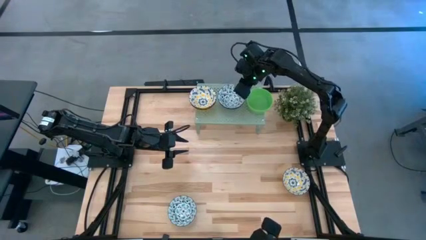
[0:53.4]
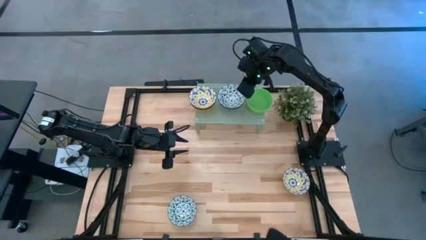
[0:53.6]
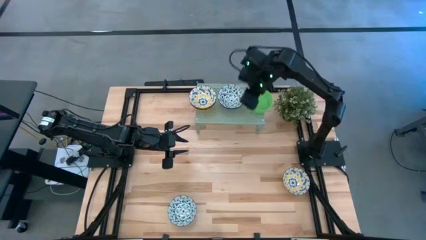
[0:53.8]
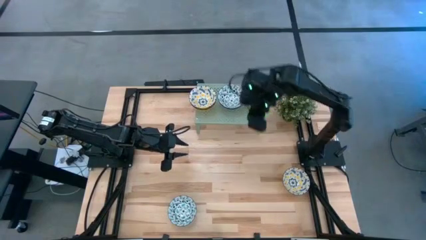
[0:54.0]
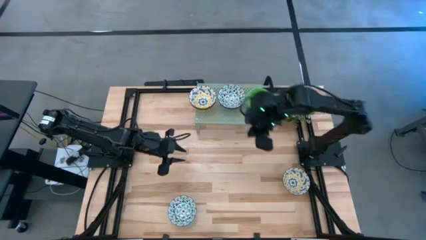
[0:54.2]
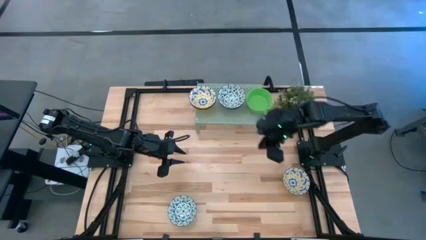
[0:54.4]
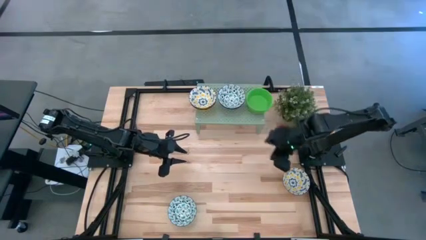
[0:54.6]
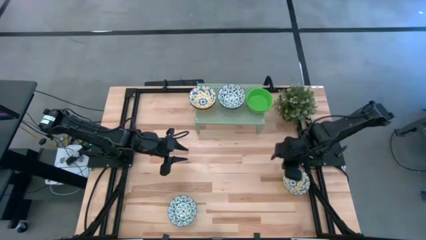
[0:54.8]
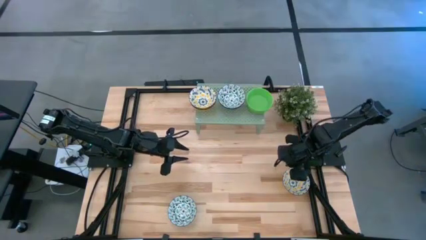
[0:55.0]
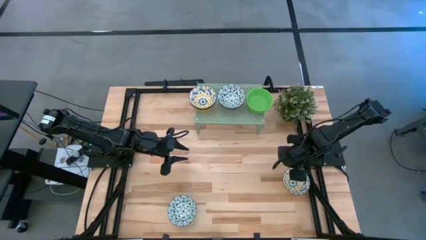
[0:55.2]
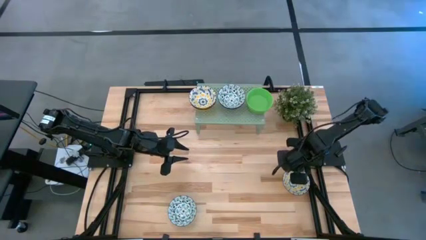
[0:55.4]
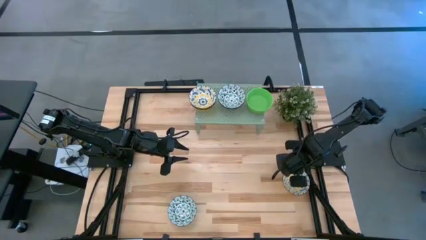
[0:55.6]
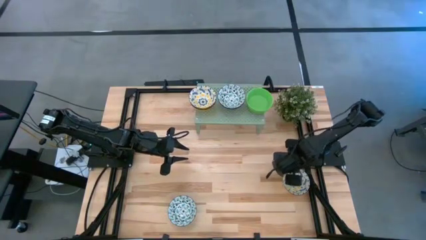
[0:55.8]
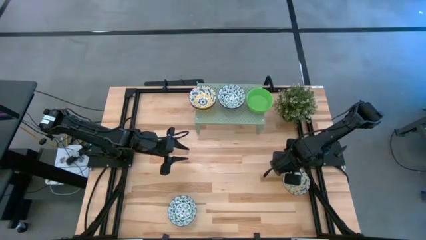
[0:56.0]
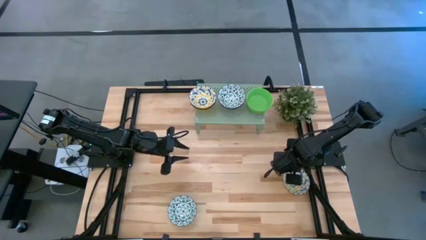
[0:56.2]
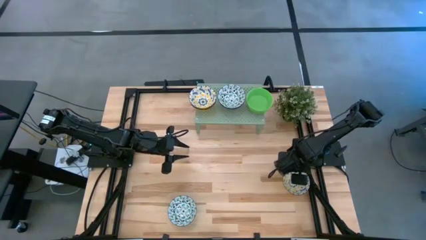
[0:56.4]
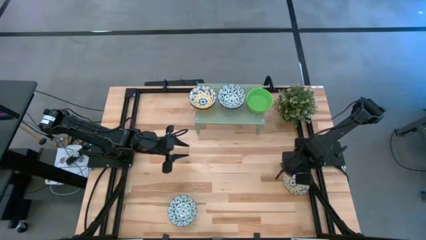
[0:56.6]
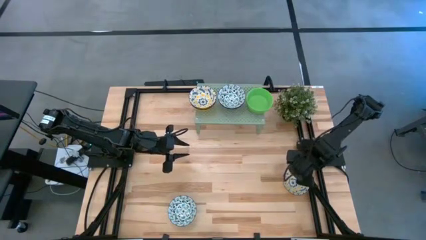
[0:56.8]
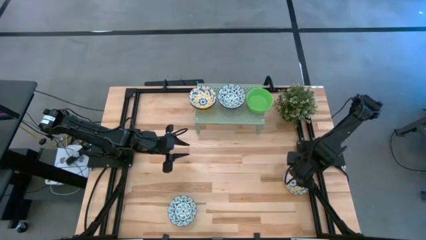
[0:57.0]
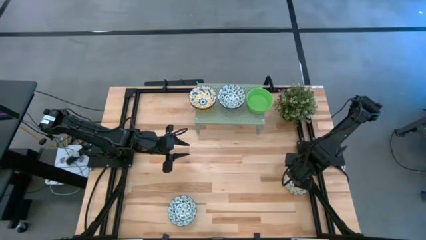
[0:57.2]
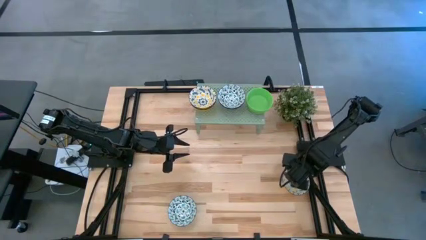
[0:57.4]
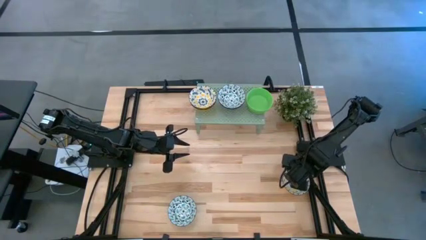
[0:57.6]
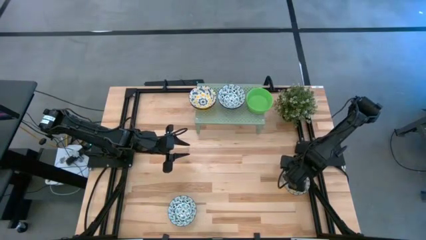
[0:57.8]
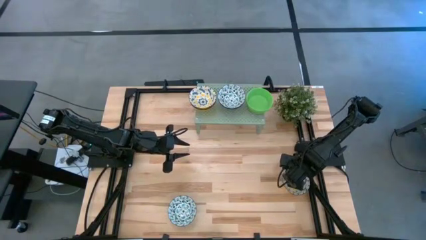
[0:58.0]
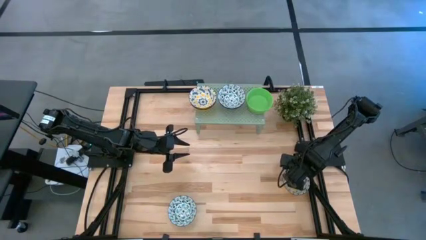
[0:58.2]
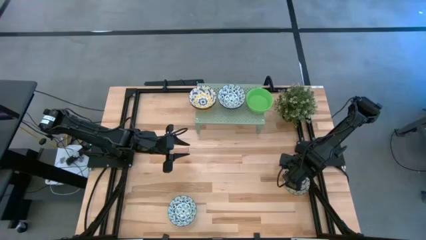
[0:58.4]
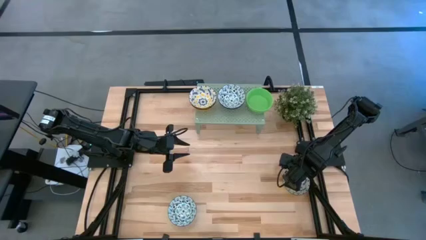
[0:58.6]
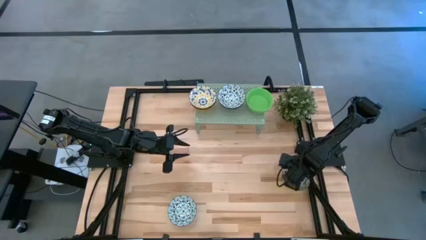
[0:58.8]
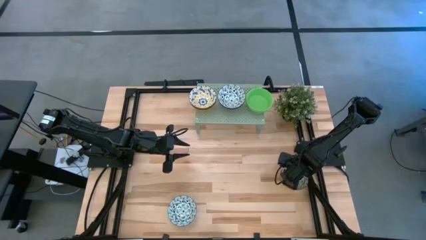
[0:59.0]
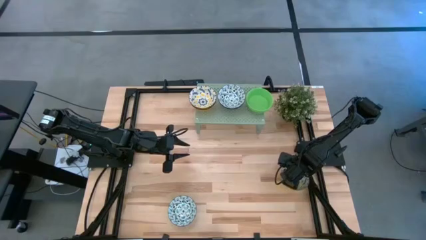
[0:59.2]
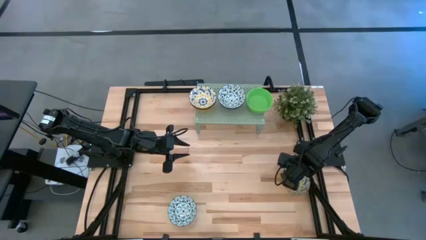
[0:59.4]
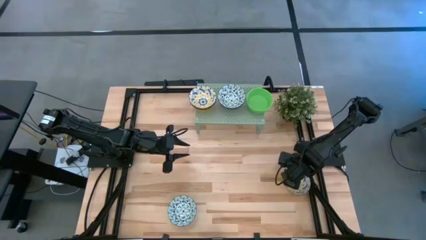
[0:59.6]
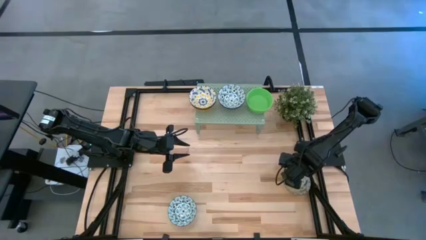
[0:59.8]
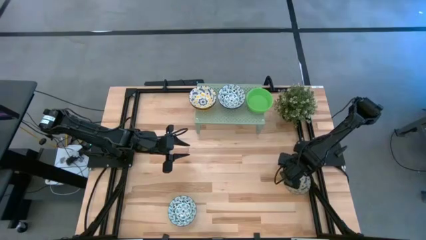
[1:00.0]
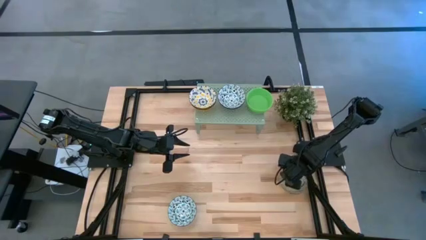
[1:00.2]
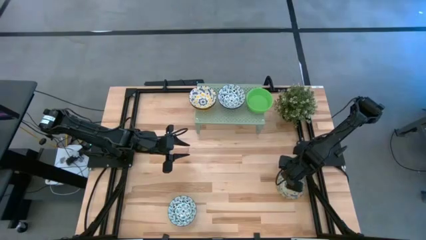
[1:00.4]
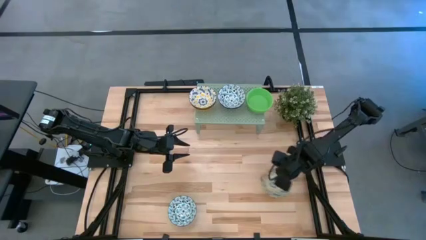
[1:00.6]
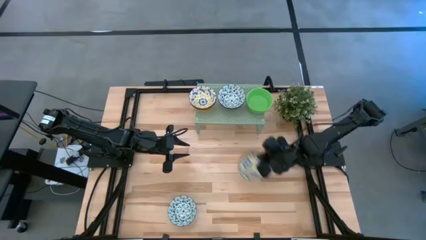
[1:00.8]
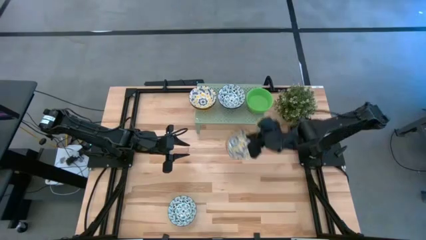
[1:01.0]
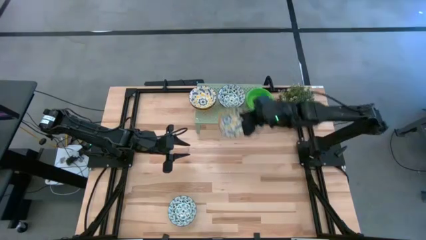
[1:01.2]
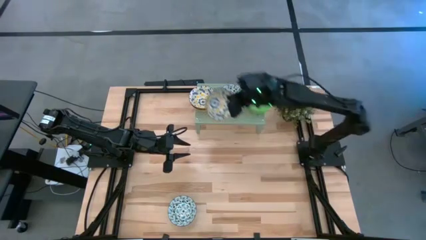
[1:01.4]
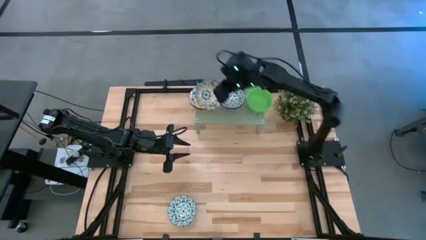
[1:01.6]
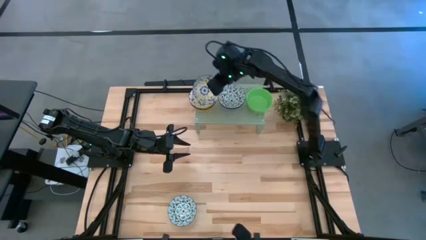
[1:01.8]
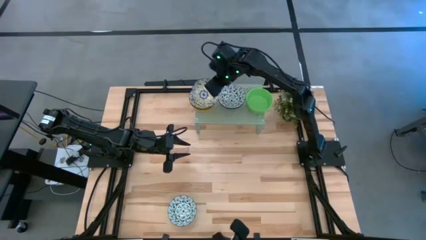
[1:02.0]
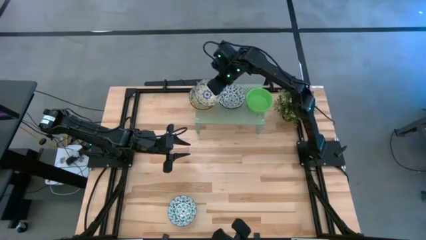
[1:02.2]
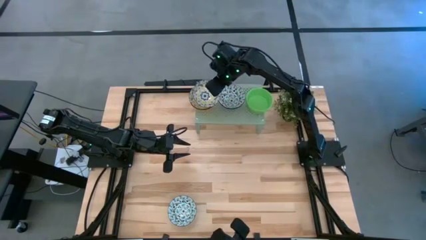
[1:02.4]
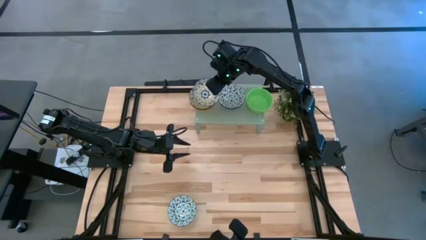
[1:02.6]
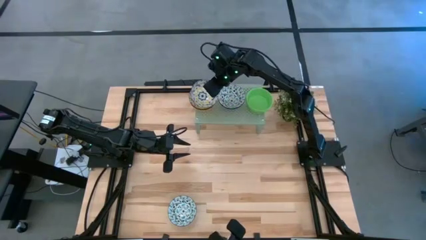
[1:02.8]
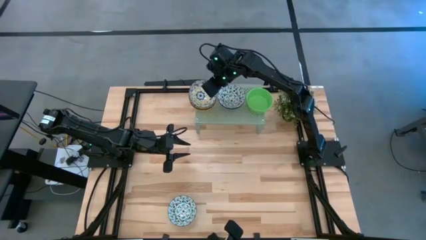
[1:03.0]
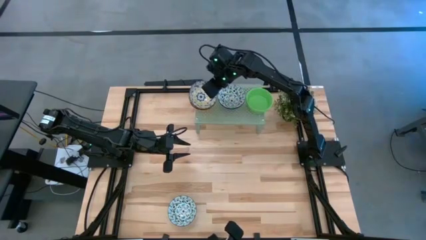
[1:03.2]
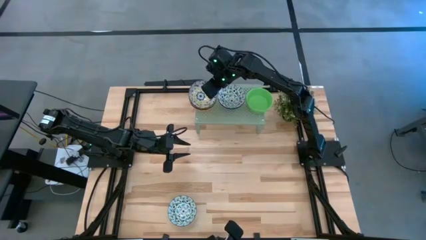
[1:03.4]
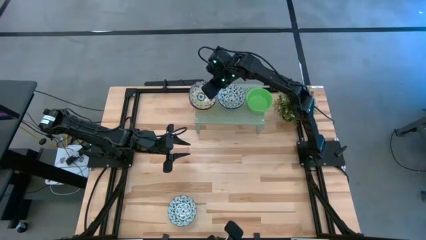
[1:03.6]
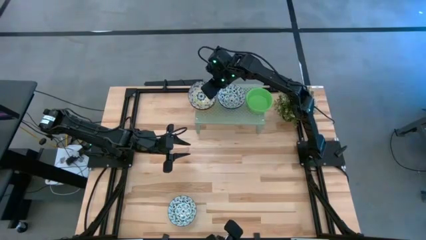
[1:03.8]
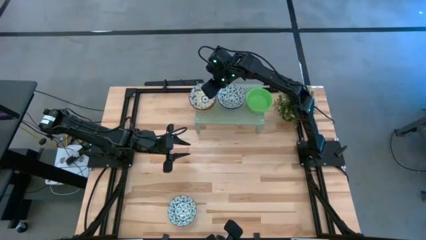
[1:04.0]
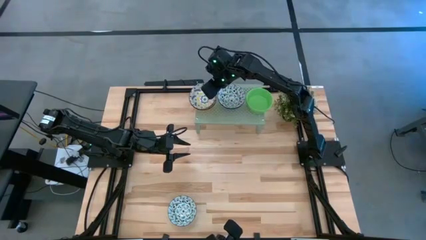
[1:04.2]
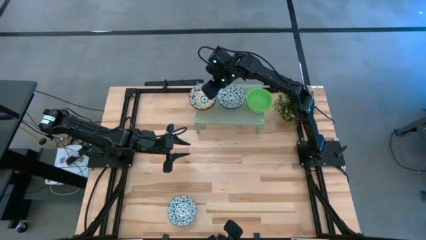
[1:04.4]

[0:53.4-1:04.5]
Task: Pick & Place Mini bowls
Stack the yellow patterned bowl on top of the other yellow patterned bowls on the shelf

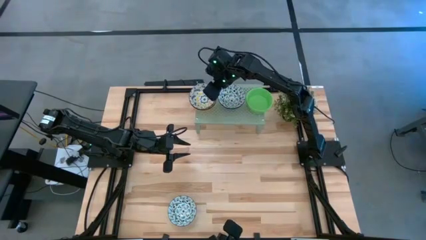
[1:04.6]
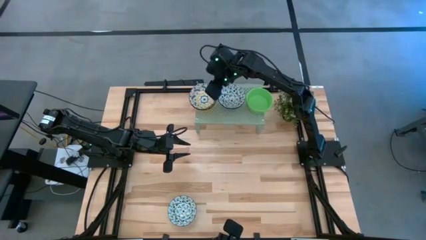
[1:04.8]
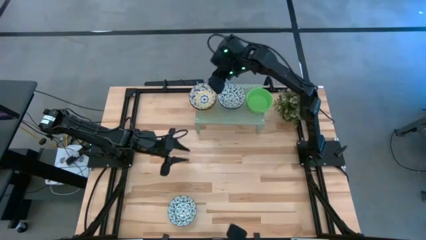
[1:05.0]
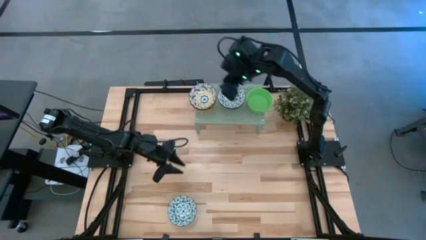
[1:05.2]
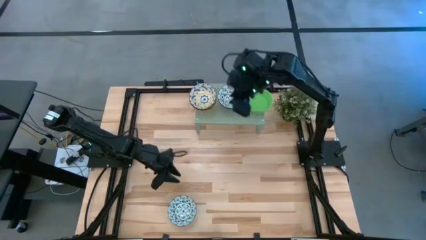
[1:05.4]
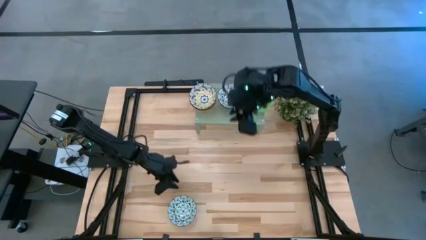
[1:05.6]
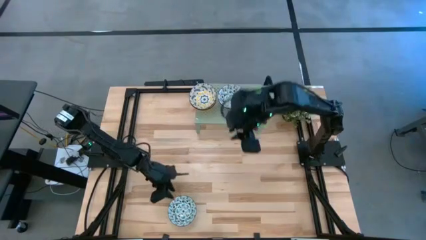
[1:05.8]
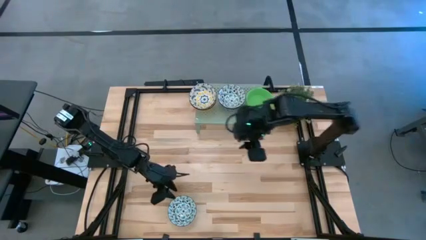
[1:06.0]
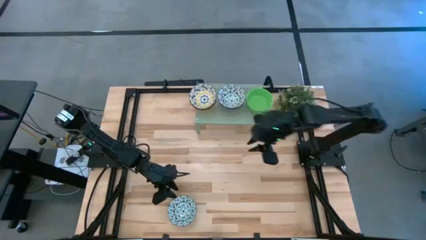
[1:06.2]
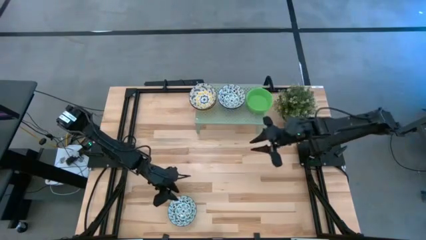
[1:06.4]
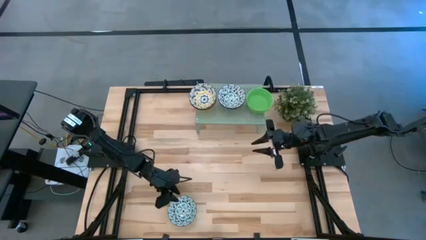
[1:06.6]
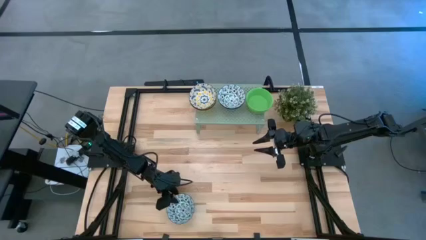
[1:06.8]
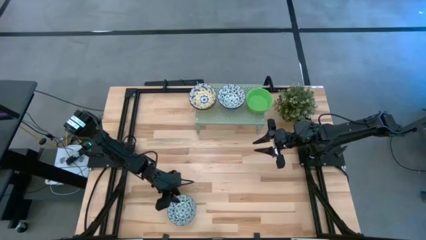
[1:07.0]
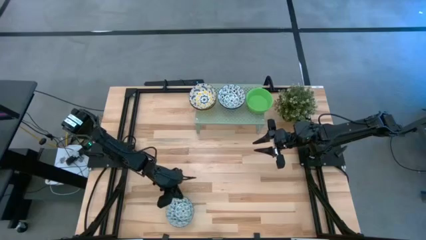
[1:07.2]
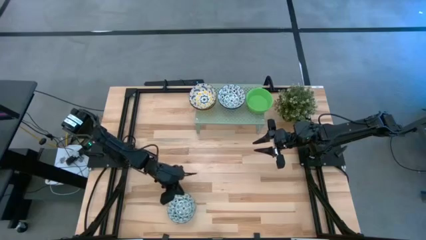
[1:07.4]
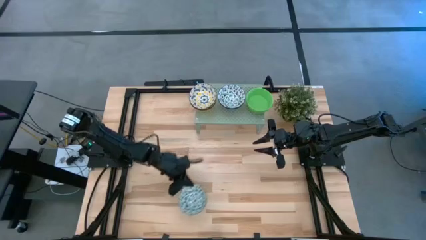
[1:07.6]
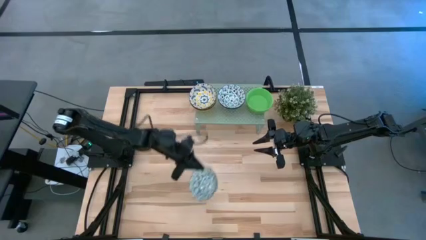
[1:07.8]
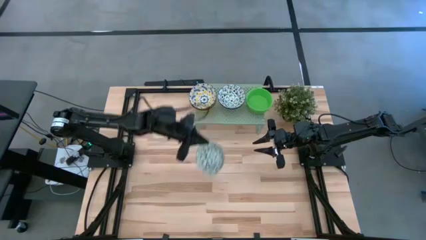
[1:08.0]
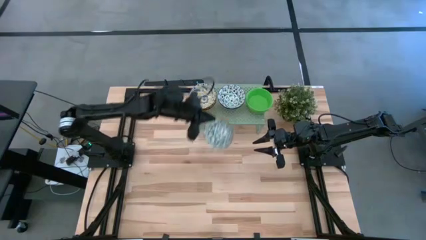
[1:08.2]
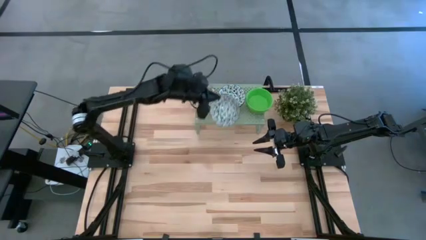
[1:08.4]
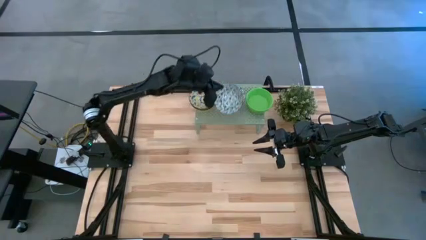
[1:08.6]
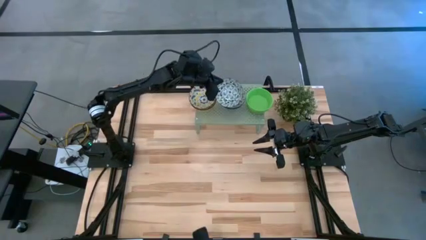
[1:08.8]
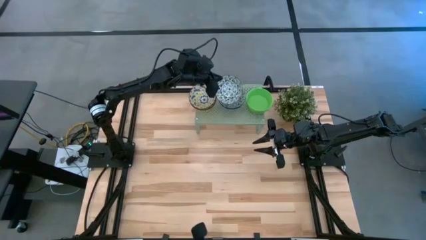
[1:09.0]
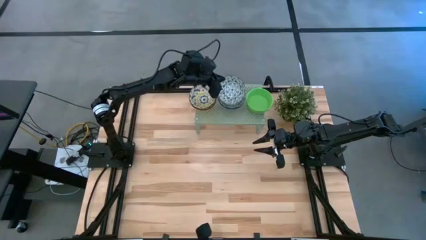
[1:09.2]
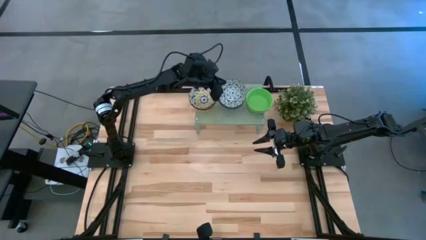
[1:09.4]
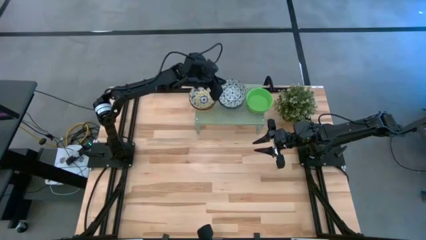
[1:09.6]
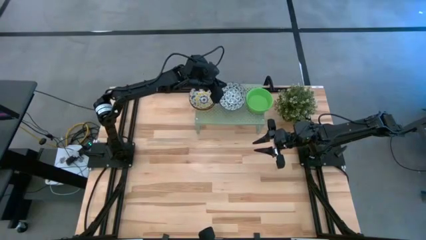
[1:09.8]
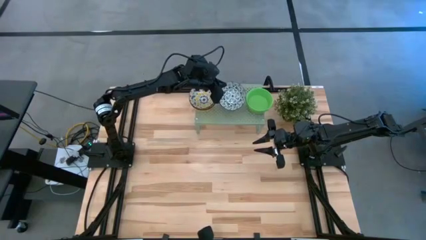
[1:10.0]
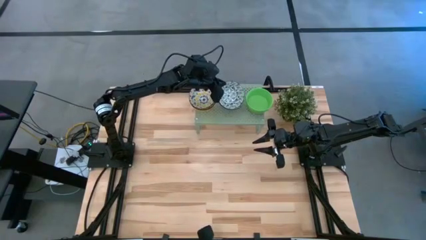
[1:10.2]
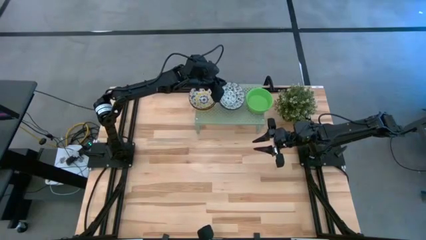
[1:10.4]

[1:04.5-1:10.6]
Stack the green patterned bowl on top of the other green patterned bowls on the shelf
